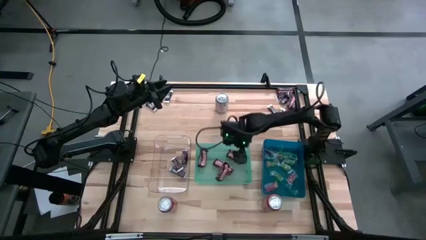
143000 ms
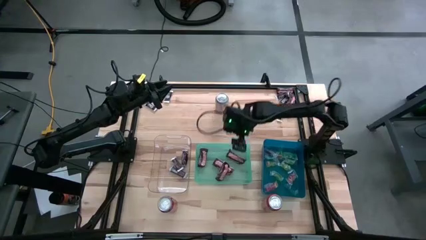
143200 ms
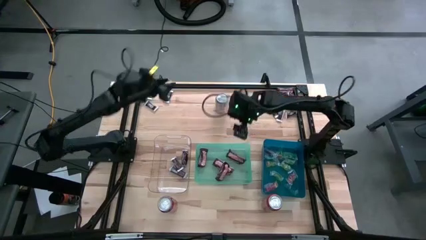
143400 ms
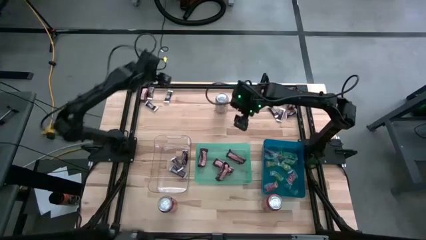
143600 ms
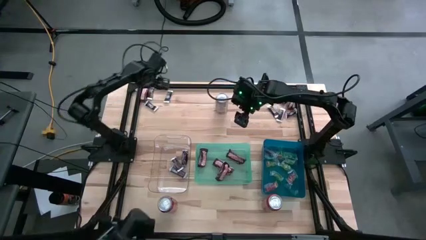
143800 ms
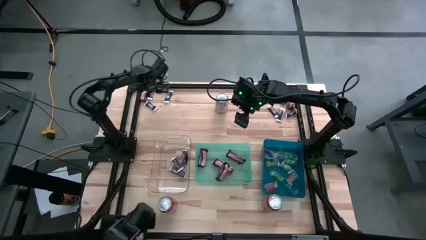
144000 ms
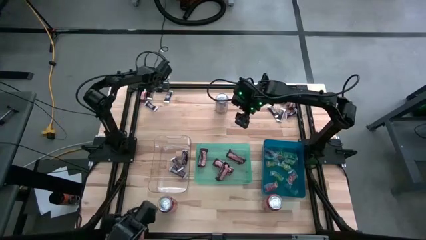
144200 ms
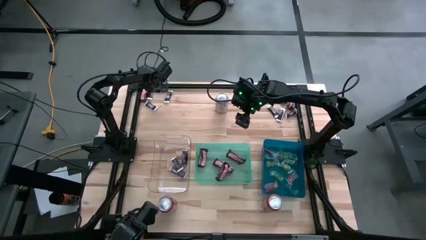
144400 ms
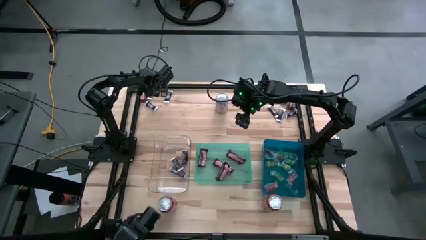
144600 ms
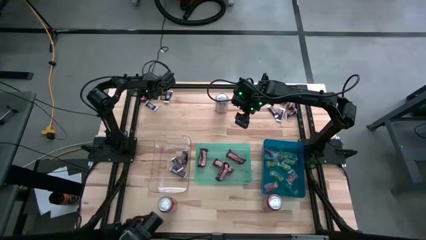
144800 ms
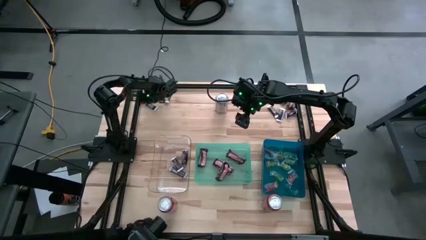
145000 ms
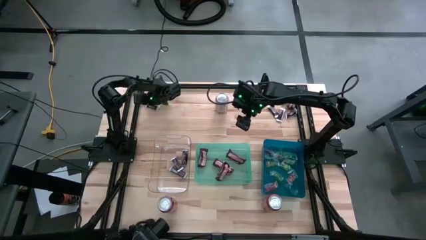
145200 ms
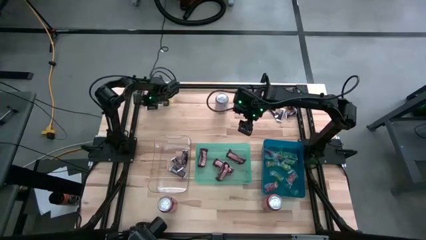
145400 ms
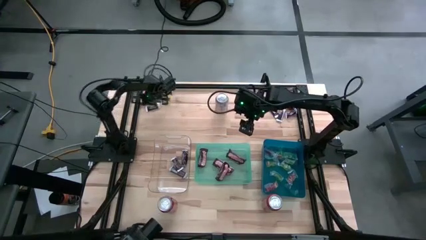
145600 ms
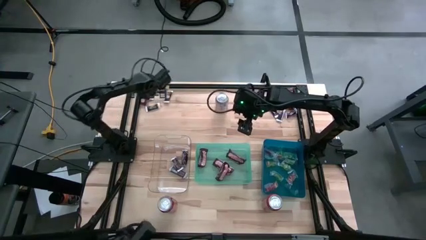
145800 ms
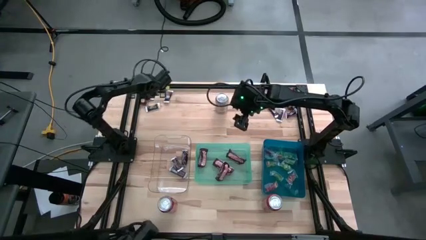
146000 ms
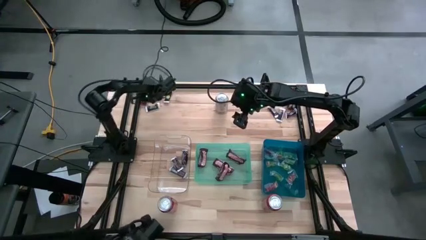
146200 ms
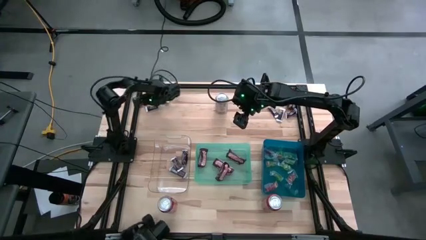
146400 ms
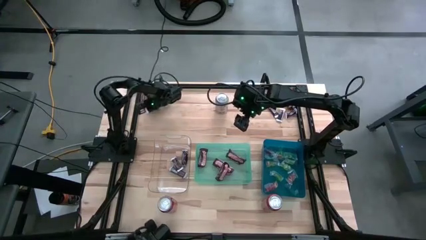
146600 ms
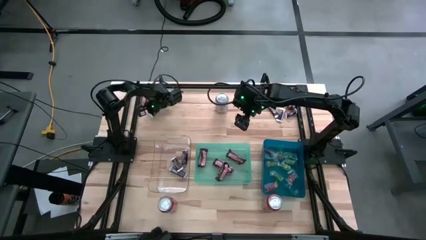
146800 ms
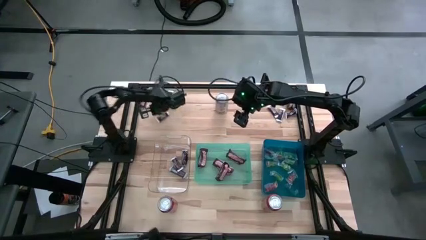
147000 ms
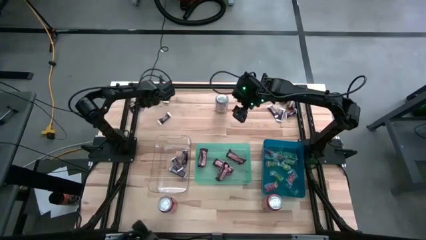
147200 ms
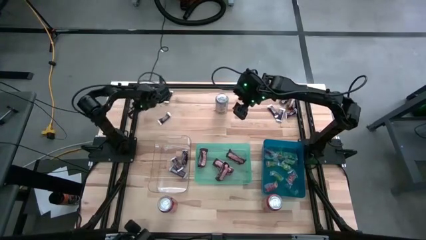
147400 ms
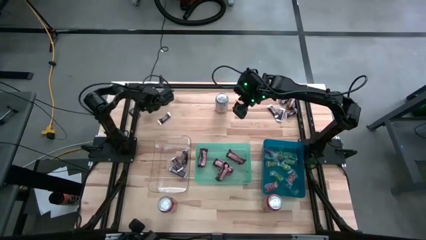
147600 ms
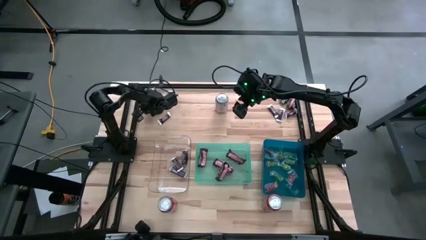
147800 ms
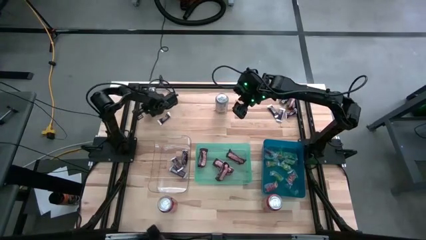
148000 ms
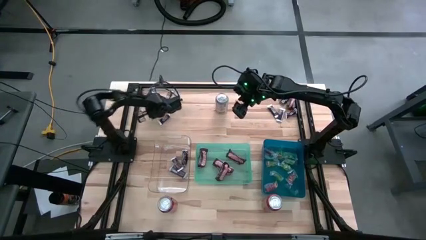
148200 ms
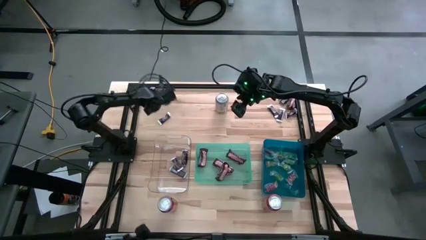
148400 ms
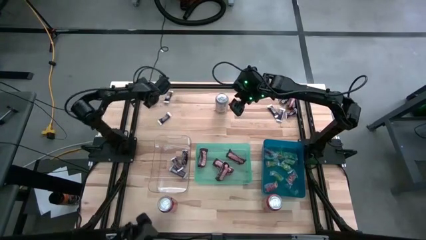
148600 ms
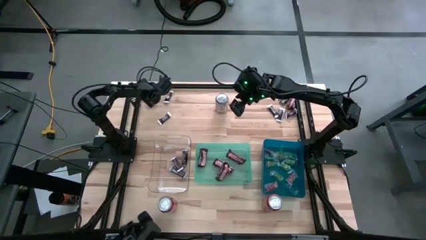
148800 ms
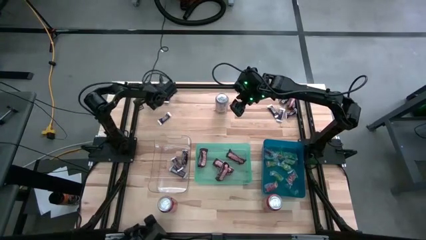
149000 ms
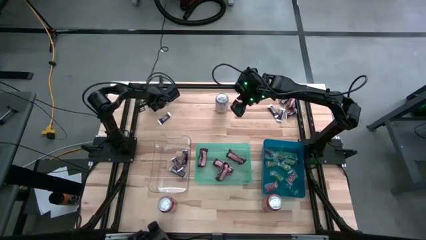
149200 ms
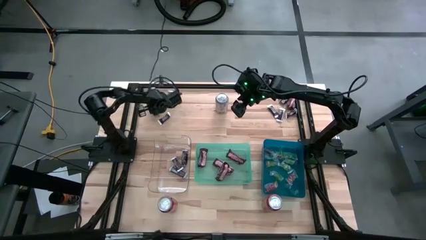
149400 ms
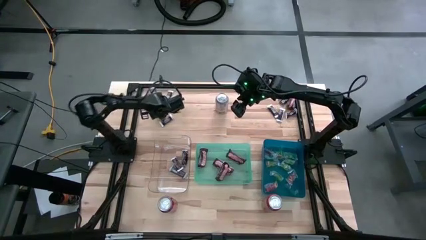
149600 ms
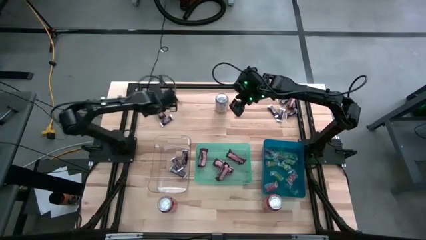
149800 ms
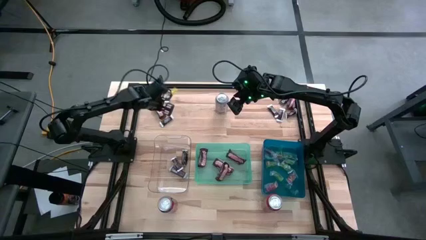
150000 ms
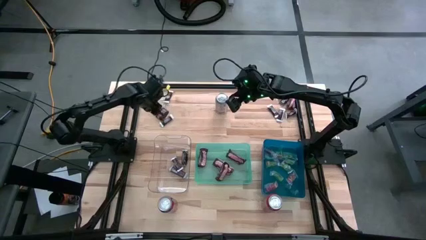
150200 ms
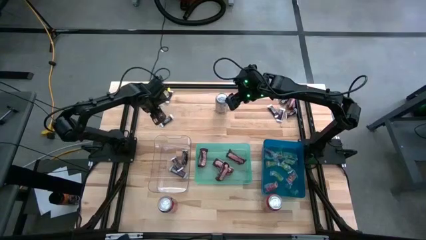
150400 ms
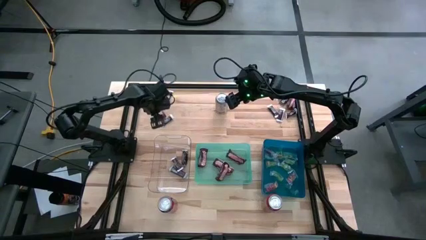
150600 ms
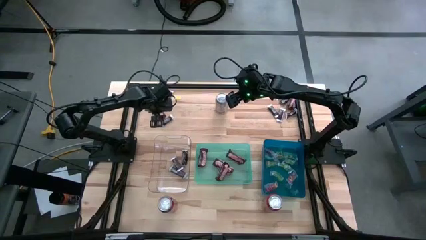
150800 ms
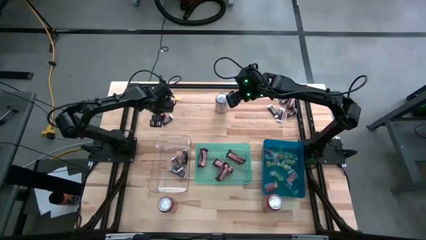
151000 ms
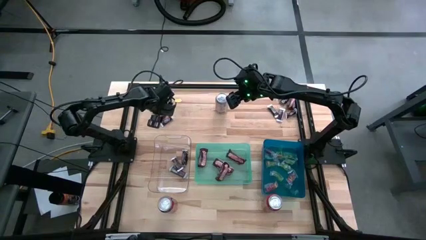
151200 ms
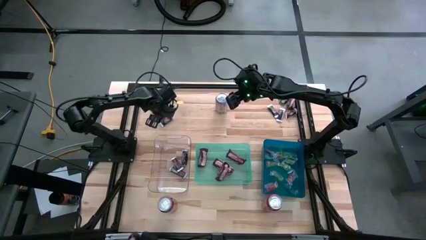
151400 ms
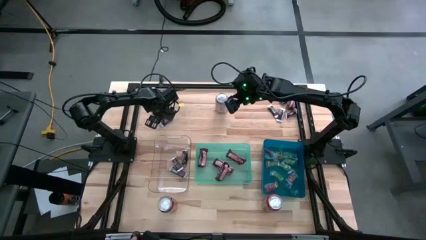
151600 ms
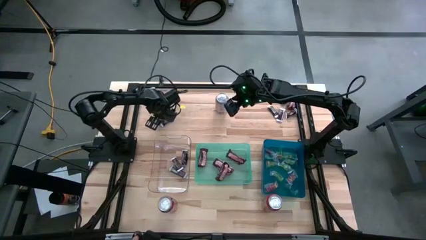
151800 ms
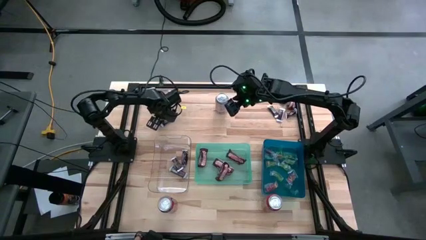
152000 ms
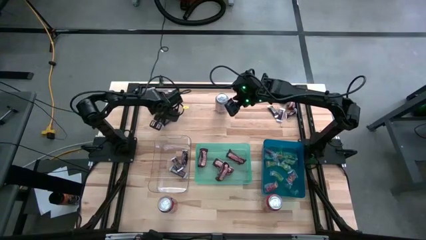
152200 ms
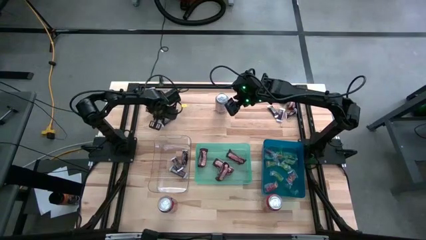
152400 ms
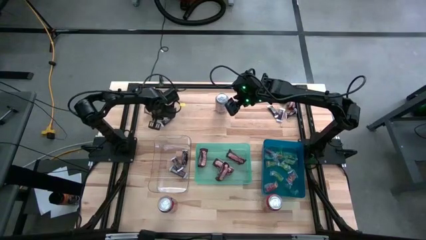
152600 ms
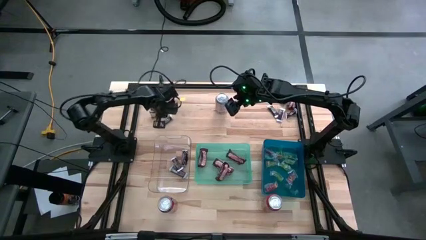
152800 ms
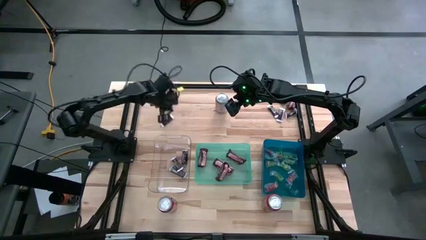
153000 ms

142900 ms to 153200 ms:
Task: Organize candy in baskets
Put the brown chocolate bar into the green bin

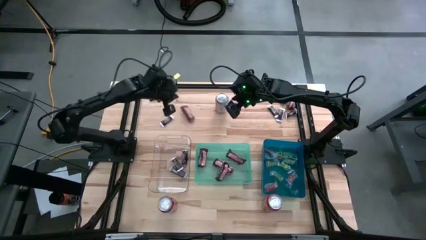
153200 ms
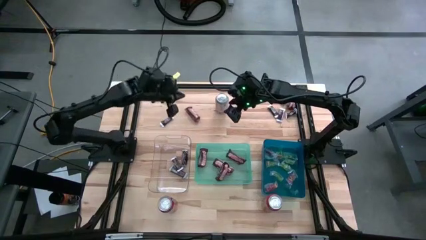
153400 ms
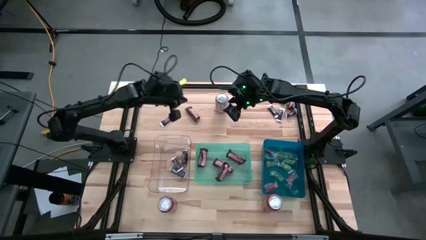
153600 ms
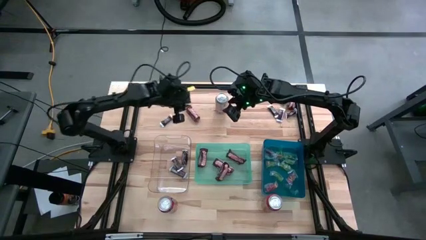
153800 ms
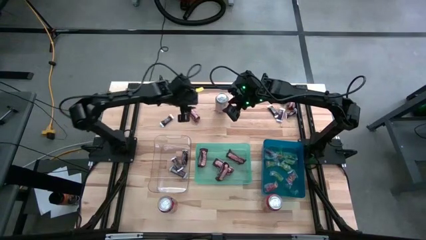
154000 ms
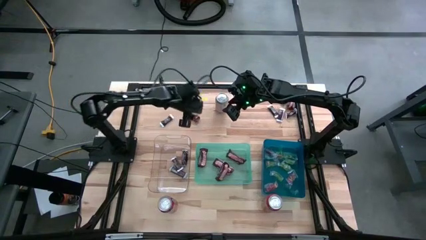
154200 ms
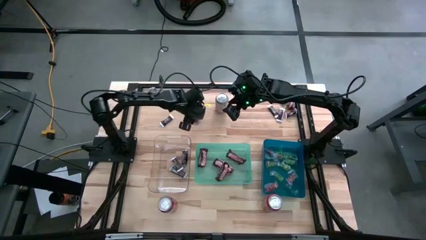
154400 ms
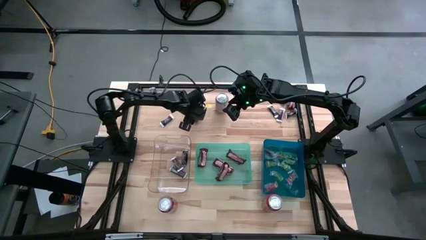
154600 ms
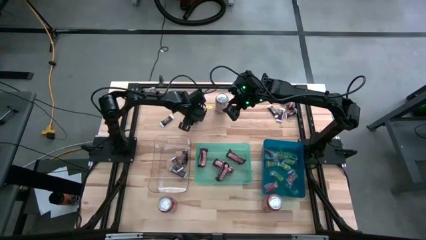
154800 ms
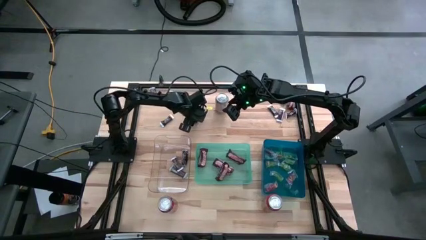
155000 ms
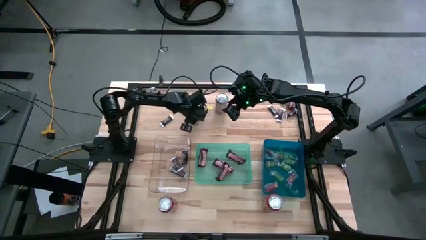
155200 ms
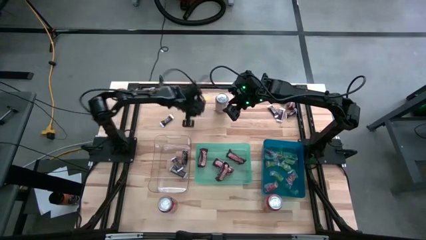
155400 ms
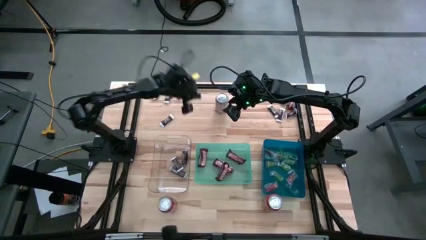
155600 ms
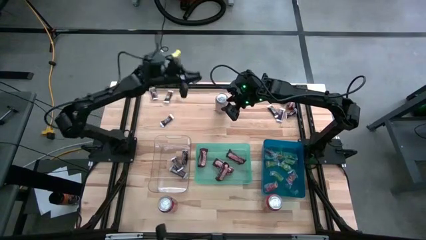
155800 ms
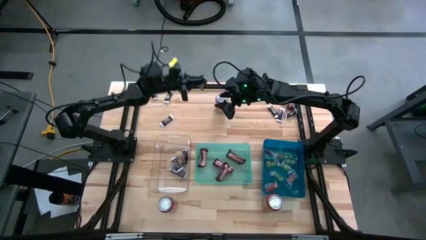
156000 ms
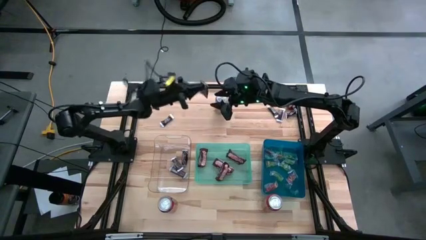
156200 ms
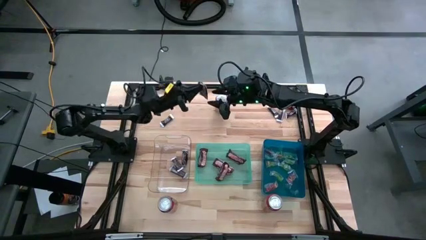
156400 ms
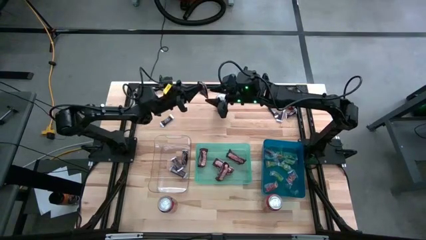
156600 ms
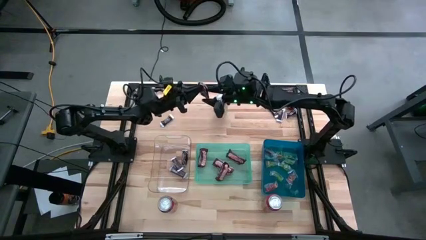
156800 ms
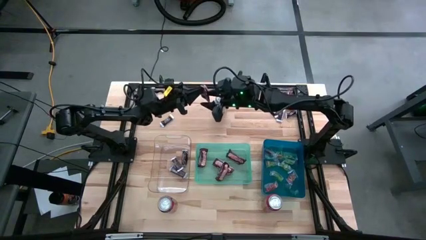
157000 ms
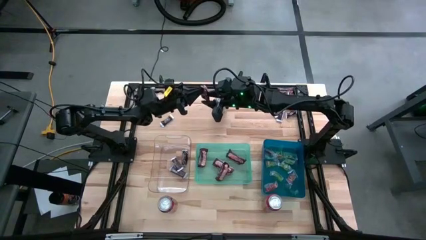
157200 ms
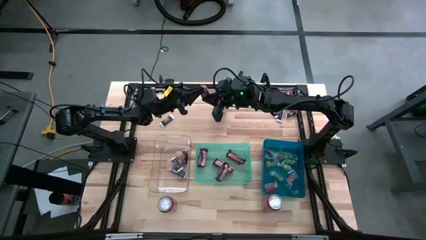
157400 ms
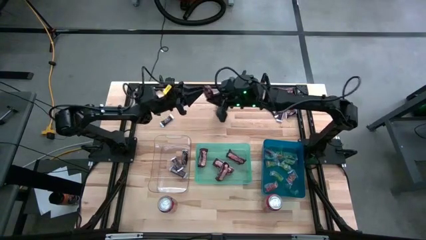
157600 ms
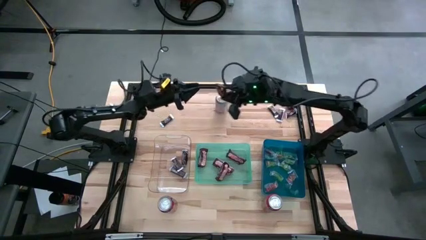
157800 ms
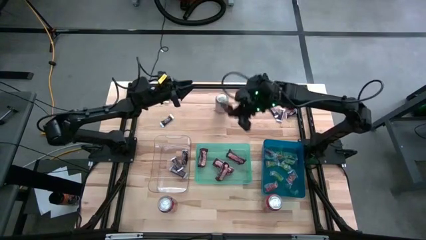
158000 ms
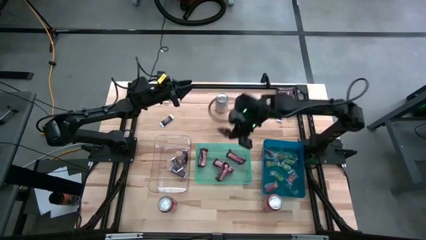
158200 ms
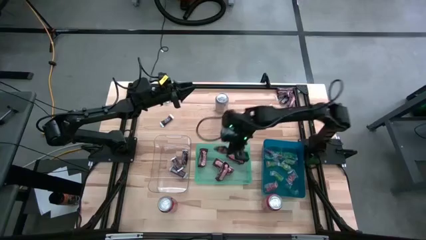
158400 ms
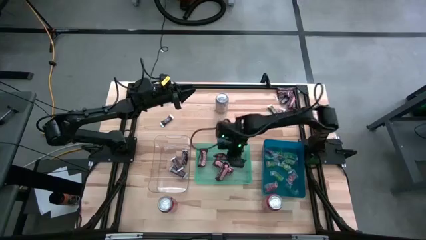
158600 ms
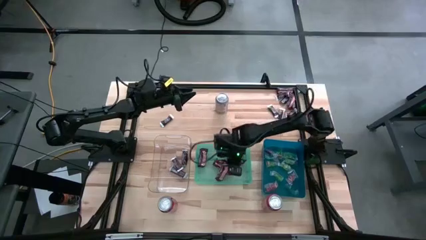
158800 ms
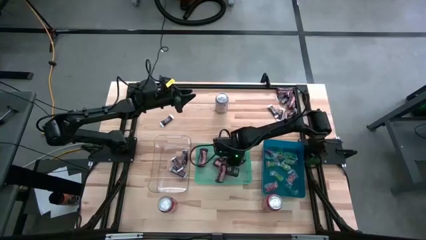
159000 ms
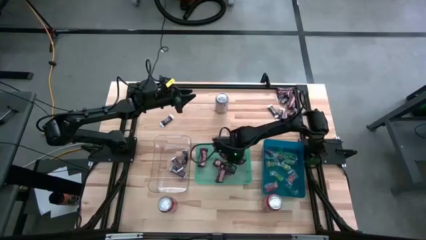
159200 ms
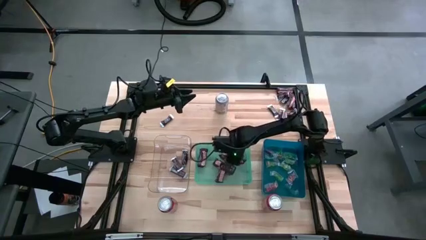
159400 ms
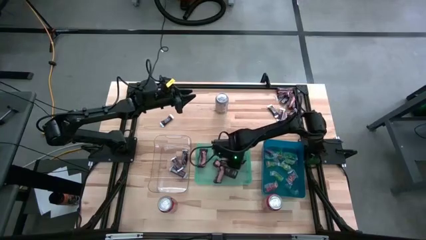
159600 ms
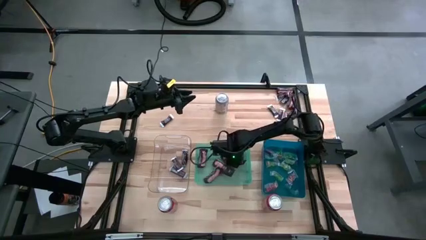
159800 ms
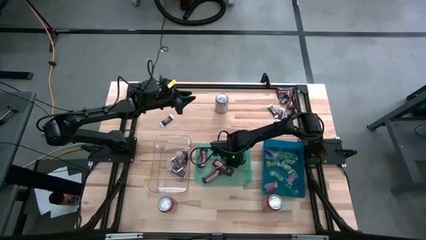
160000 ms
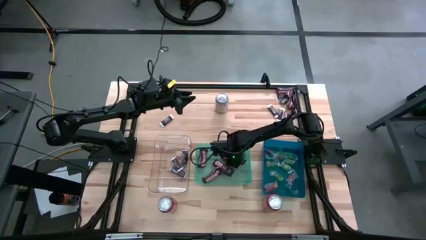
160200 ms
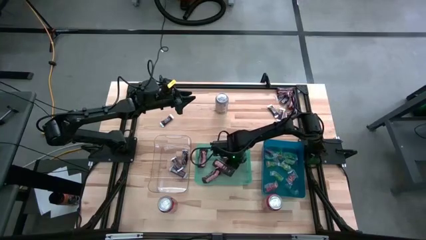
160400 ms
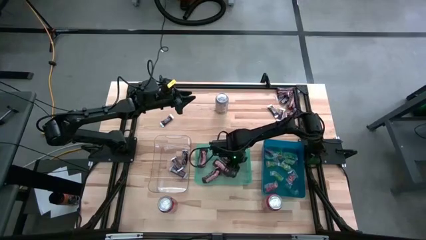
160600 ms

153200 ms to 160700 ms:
Put the brown chocolate bar into the green bin
